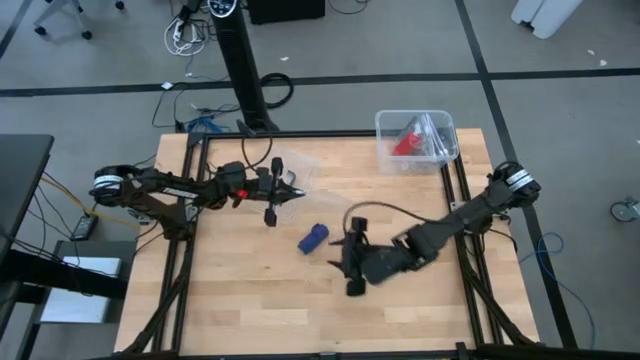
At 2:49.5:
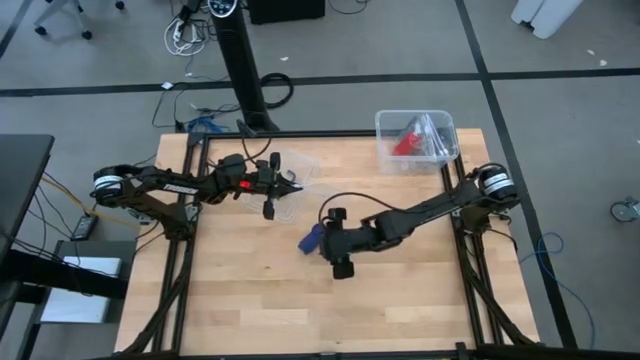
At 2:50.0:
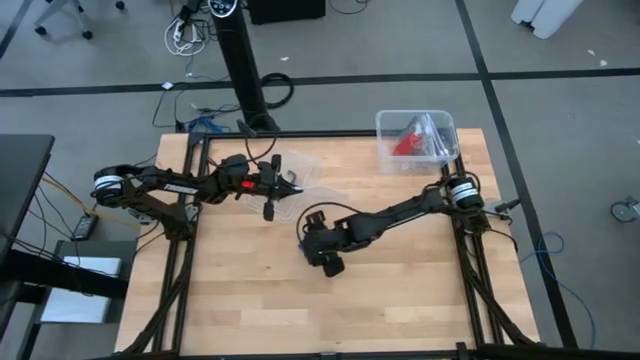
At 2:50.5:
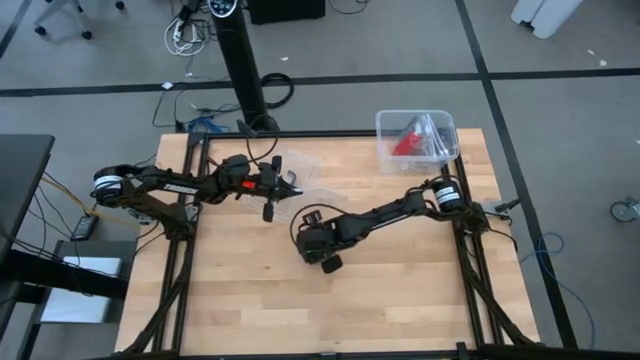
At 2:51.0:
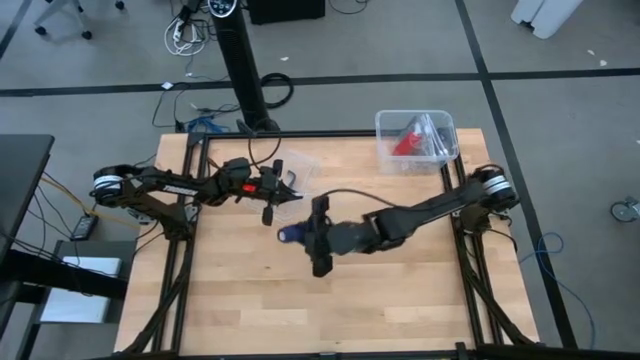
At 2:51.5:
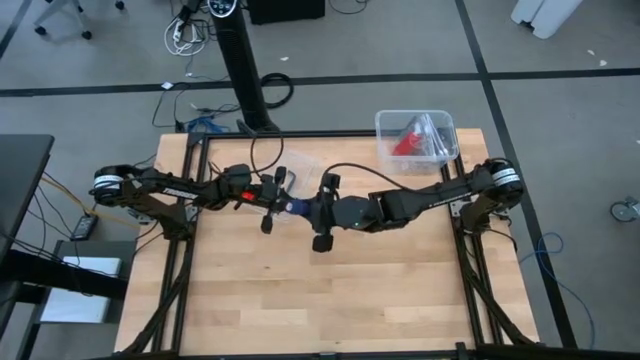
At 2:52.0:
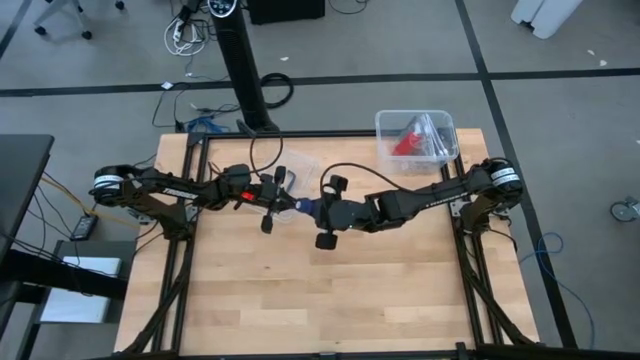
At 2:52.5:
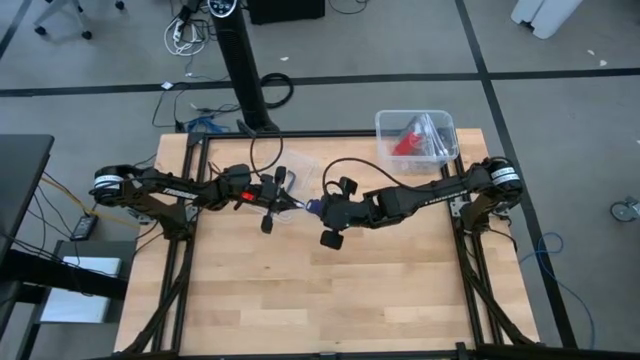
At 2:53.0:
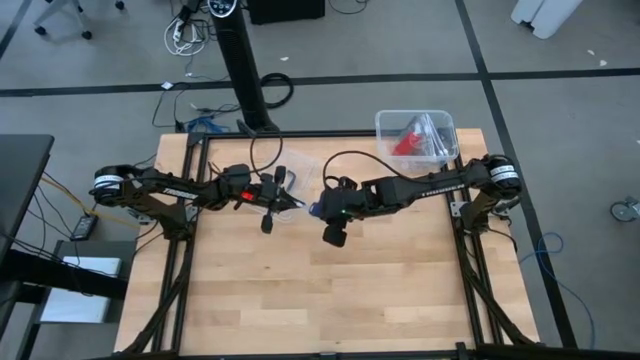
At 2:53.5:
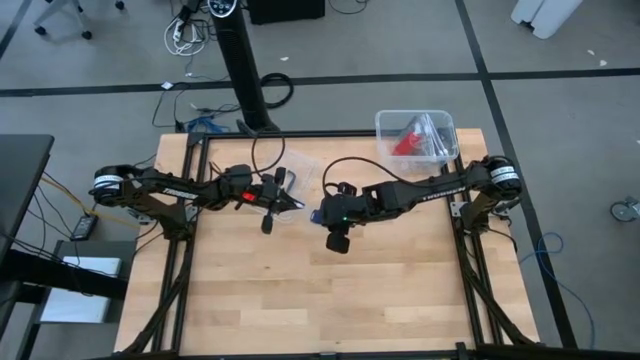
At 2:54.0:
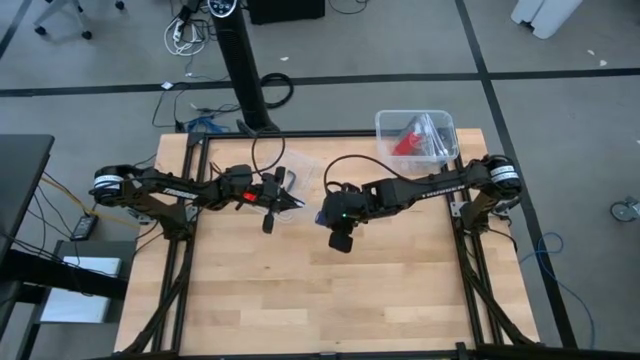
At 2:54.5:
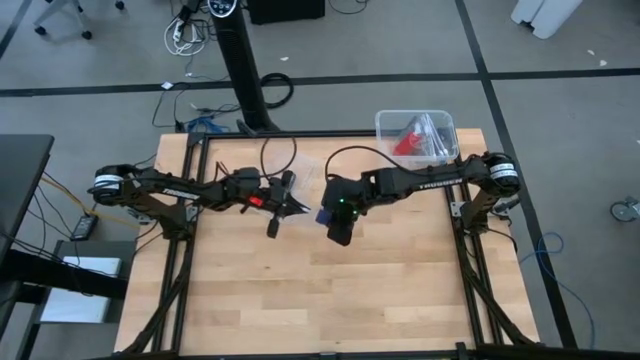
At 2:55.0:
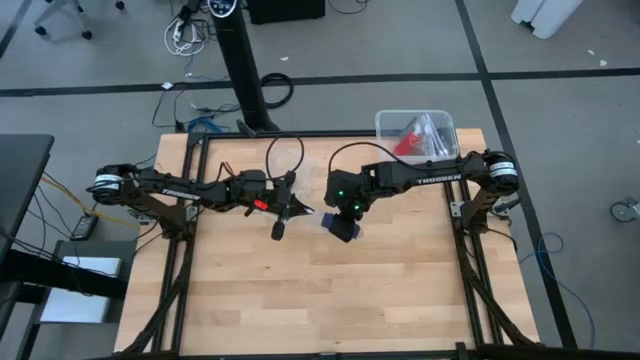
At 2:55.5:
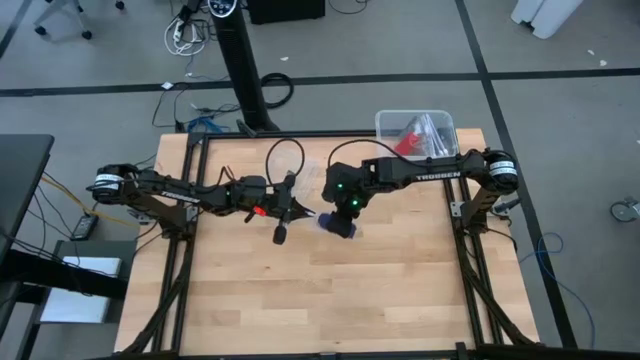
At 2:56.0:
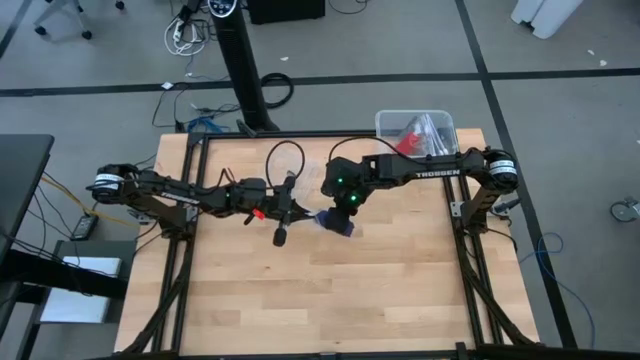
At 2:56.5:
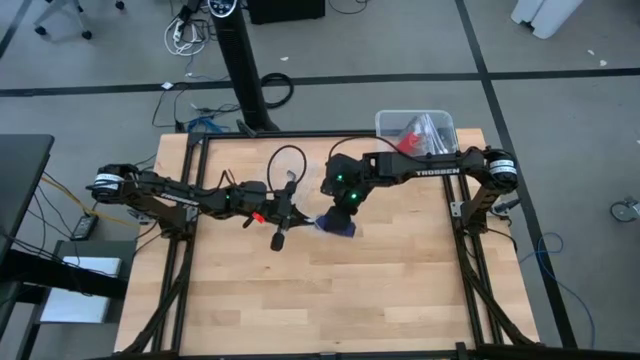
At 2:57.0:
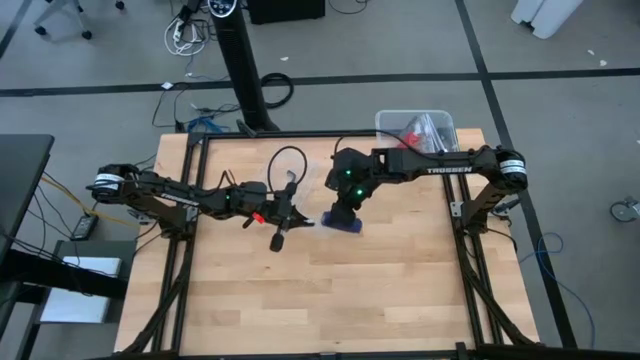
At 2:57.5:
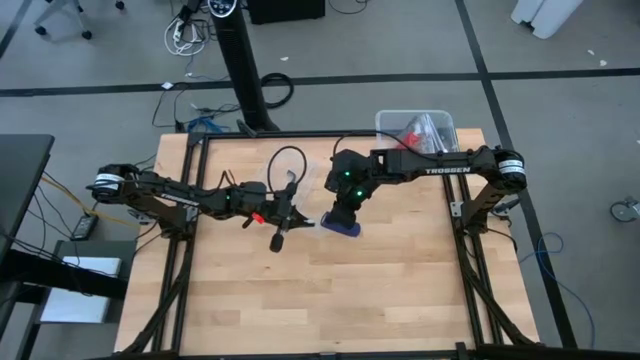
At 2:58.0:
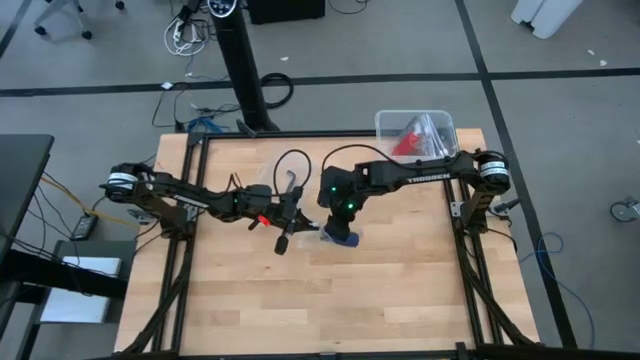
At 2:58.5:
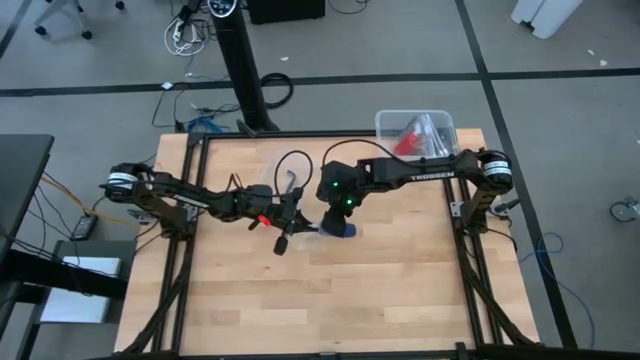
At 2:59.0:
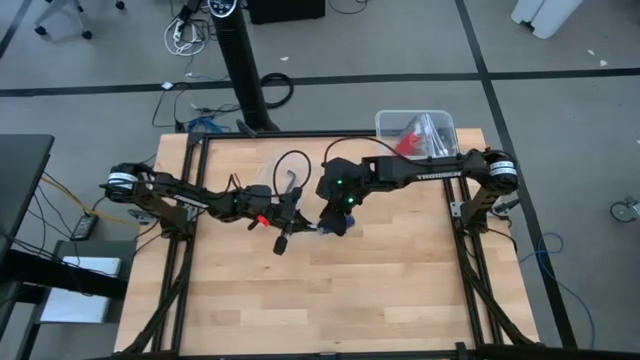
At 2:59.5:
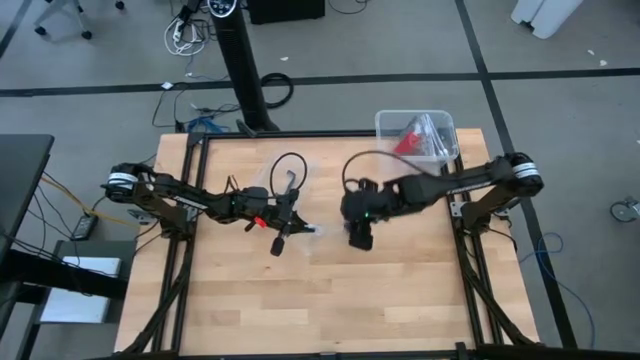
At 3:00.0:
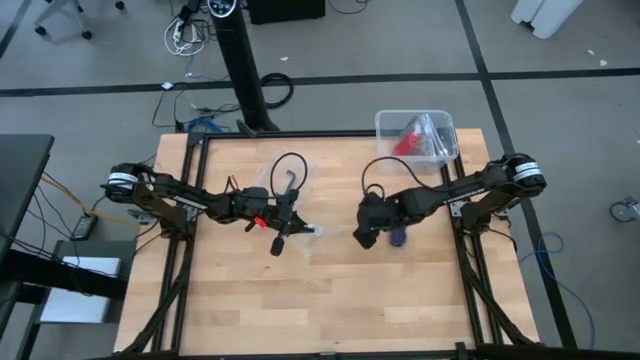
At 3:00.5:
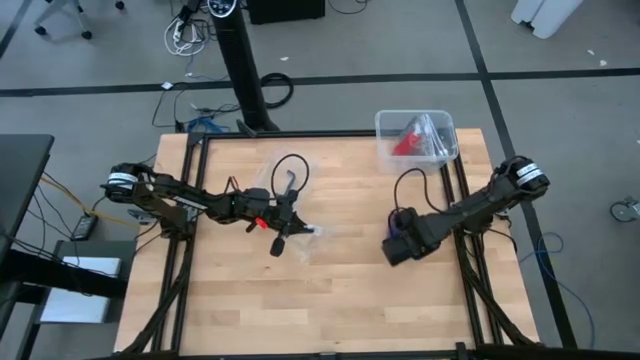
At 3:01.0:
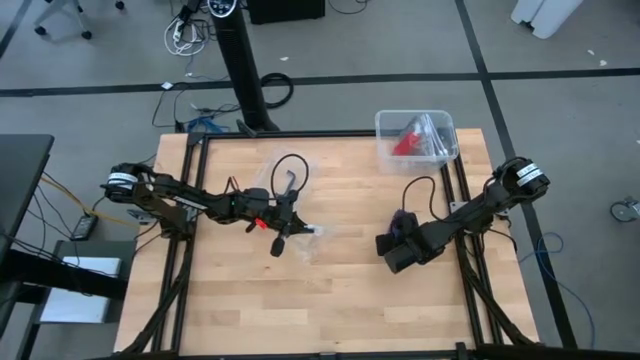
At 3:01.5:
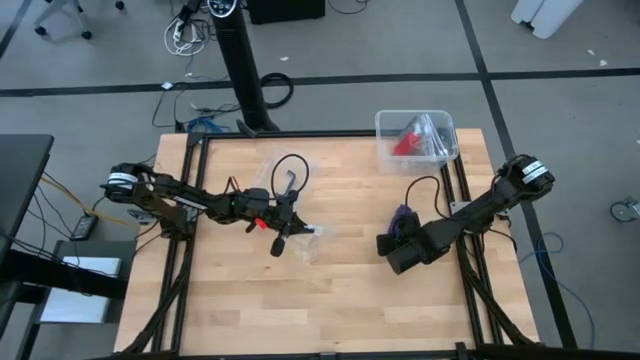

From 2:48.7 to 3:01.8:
Task: Roll bandage
Put the blue rolled bandage inside the transparent zip bag

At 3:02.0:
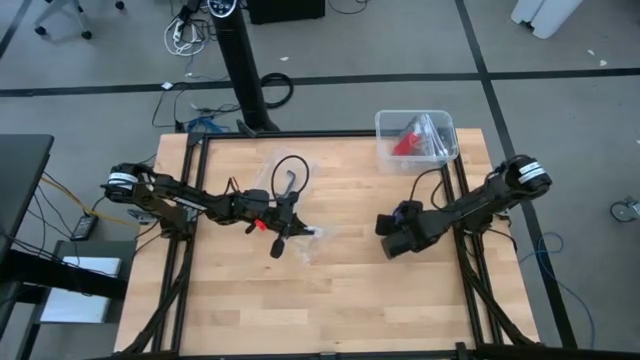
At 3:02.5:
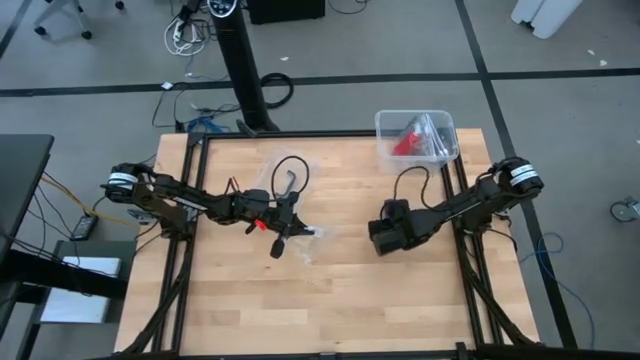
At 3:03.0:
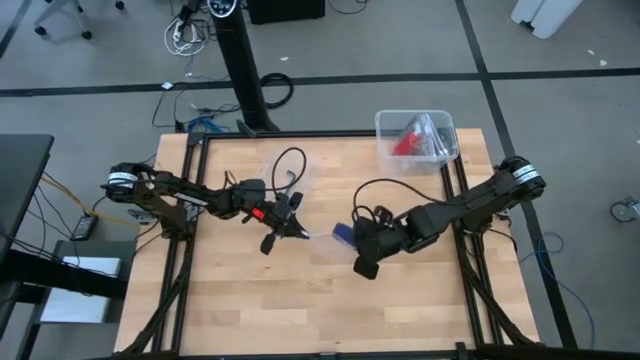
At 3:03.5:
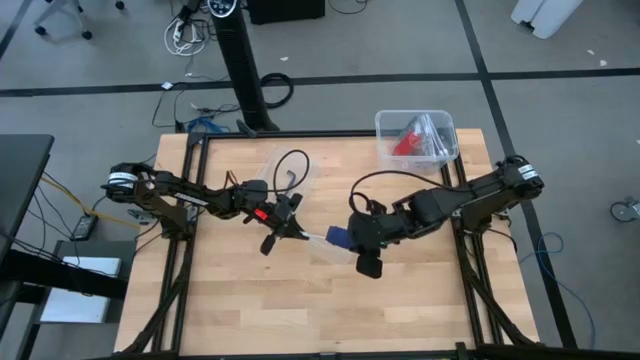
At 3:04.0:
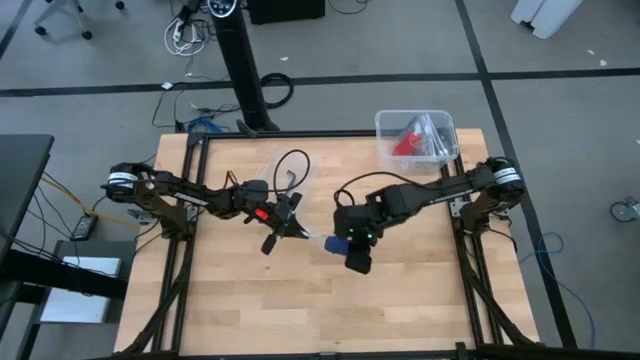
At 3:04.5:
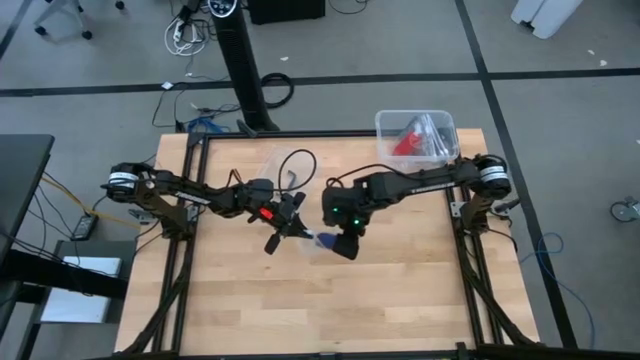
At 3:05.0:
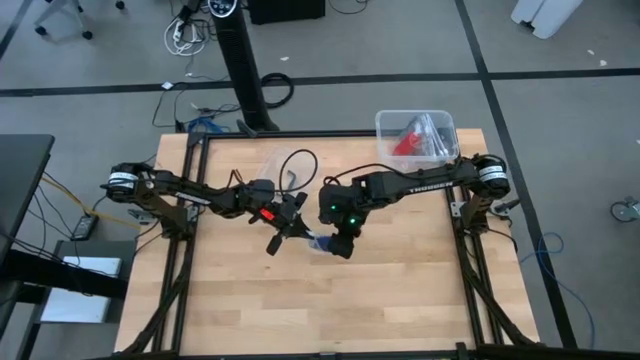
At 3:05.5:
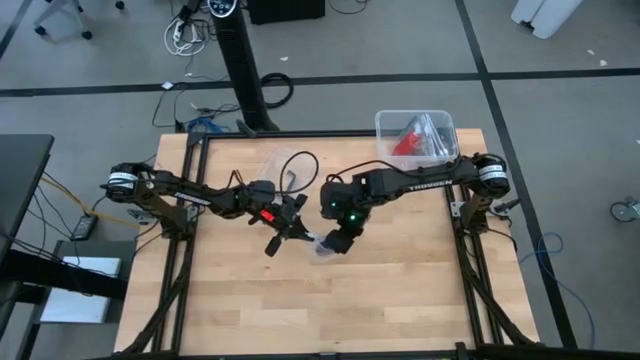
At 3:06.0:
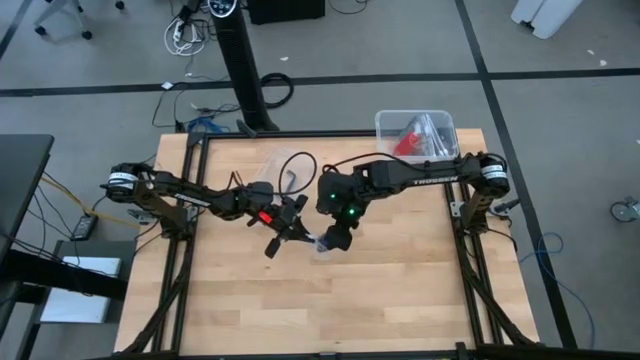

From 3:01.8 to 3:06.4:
Put the blue rolled bandage inside the transparent zip bag

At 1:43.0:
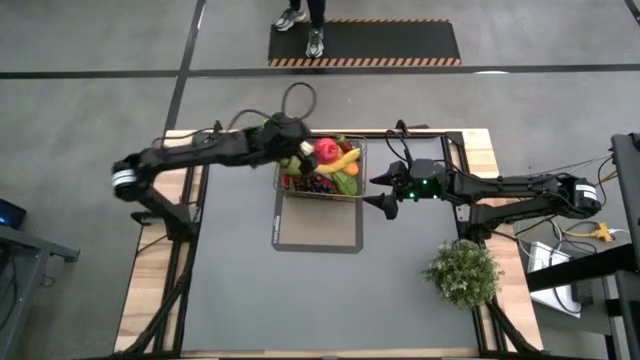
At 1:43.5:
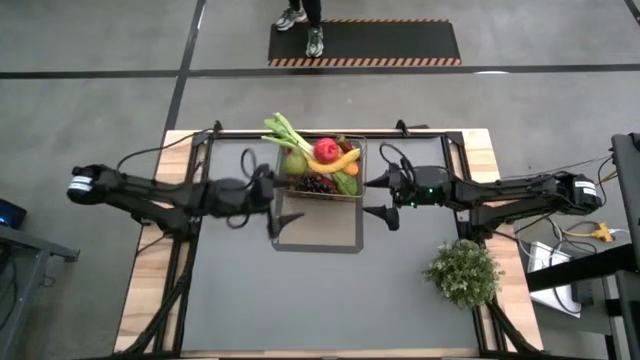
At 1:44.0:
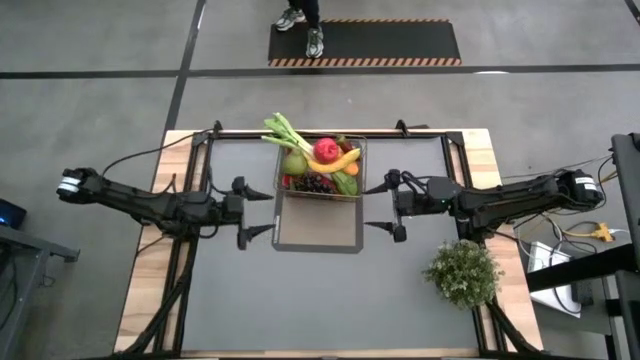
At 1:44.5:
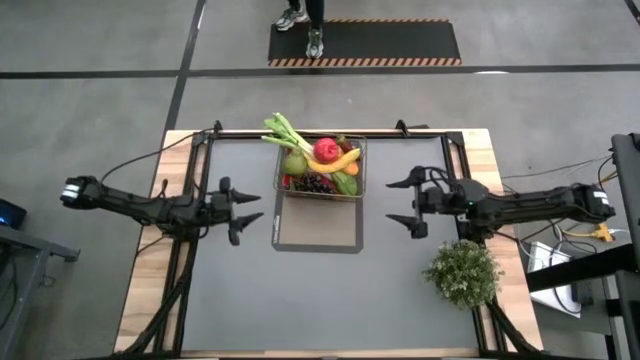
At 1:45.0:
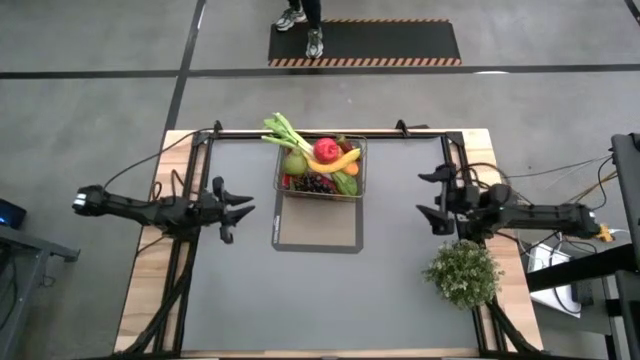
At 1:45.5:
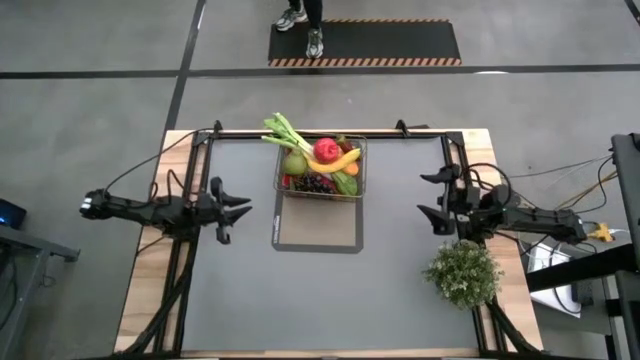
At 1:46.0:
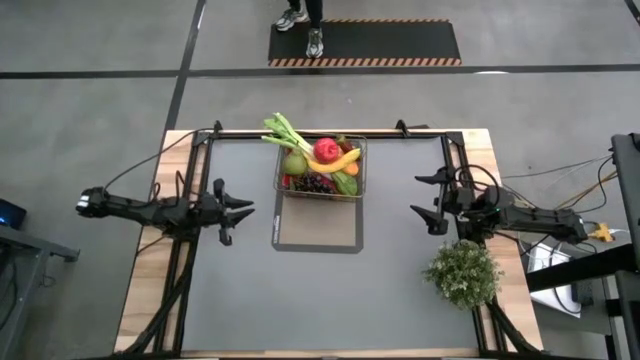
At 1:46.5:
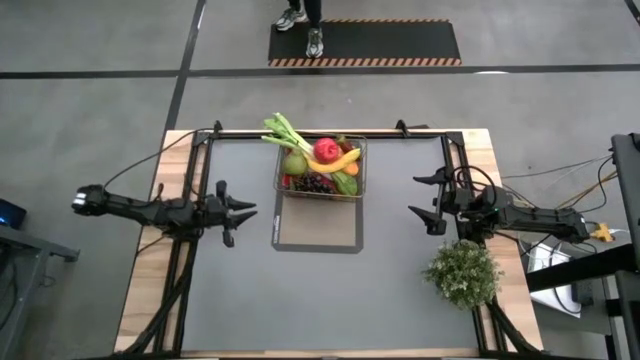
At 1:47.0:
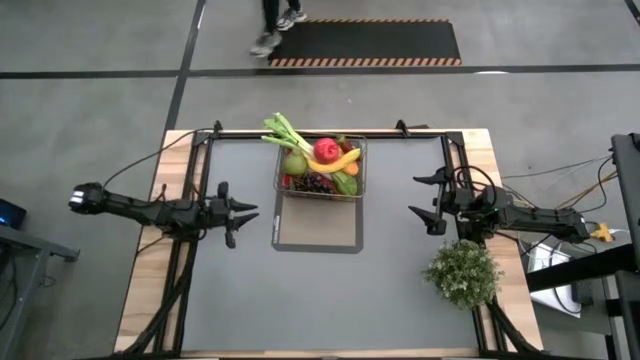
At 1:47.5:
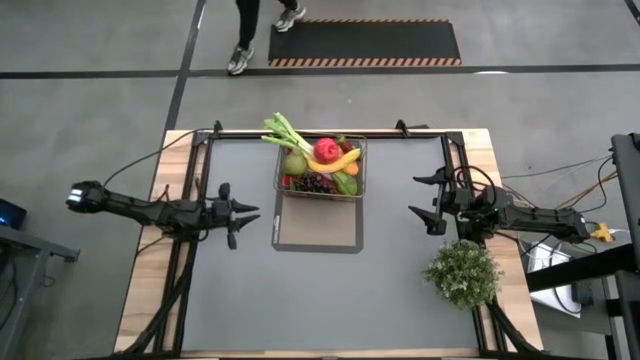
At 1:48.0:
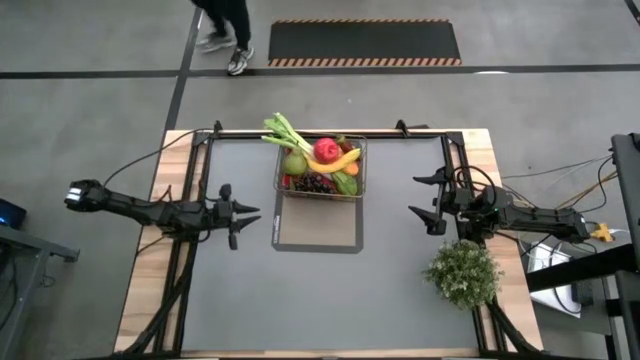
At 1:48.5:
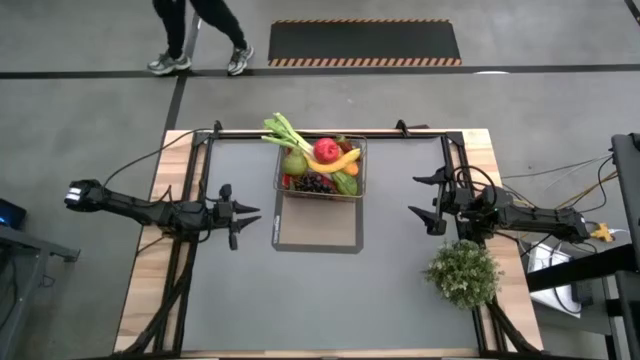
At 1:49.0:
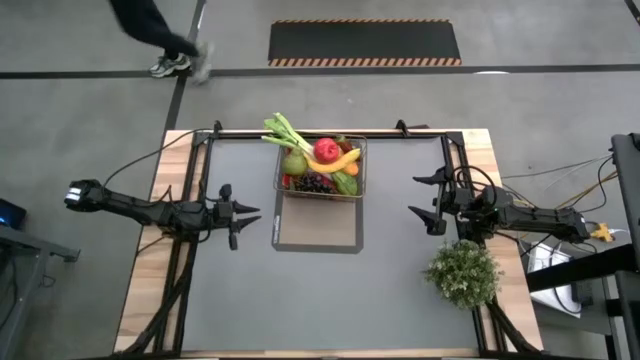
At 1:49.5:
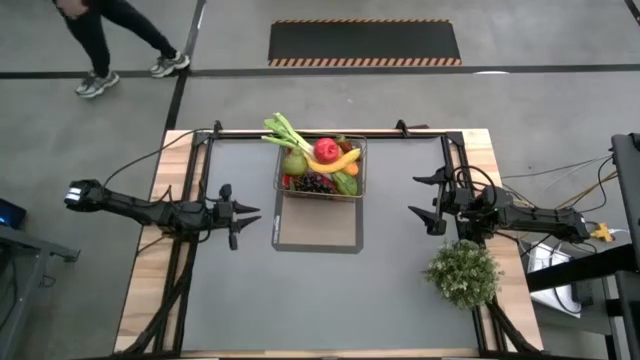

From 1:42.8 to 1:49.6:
Task: Build produce basket
Return to Home Position
